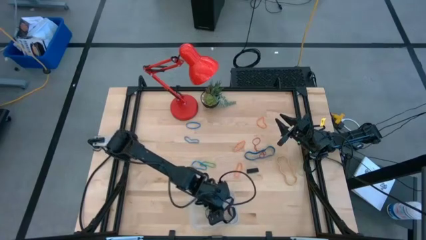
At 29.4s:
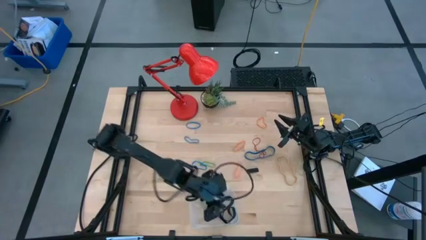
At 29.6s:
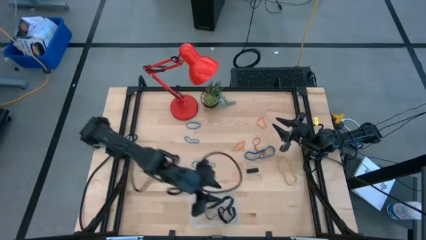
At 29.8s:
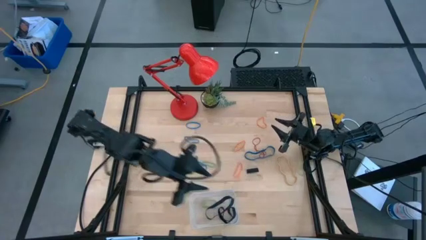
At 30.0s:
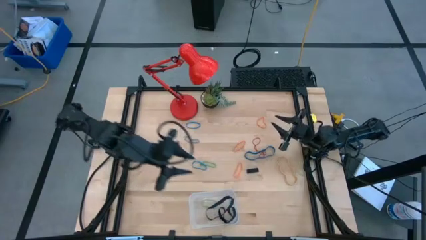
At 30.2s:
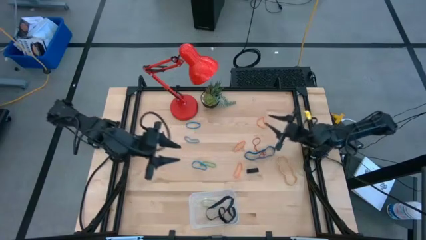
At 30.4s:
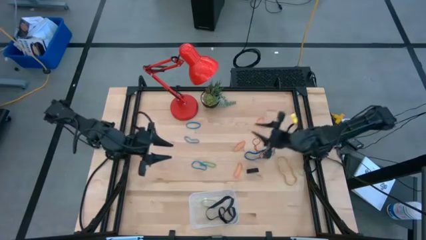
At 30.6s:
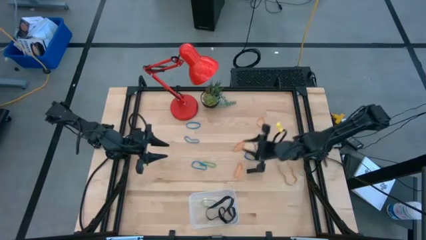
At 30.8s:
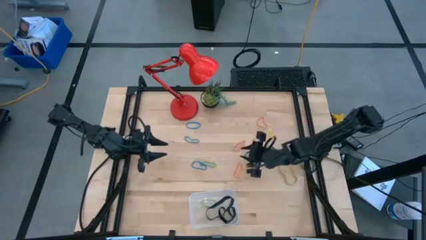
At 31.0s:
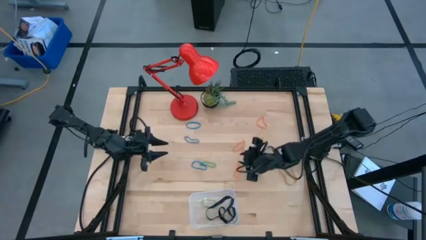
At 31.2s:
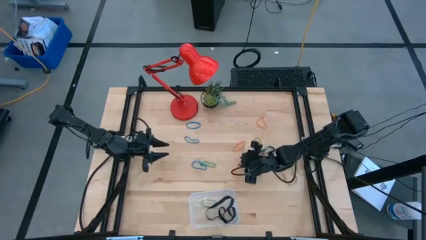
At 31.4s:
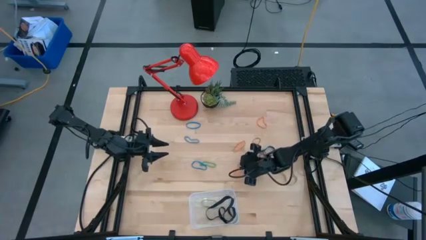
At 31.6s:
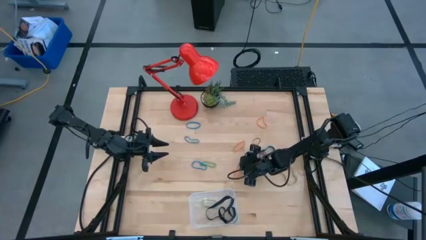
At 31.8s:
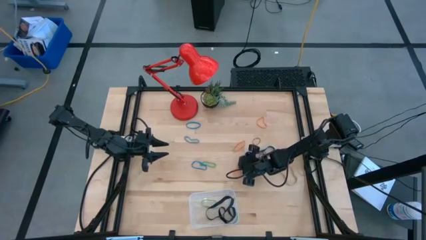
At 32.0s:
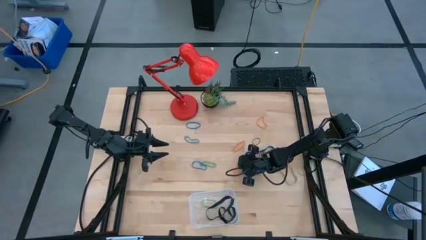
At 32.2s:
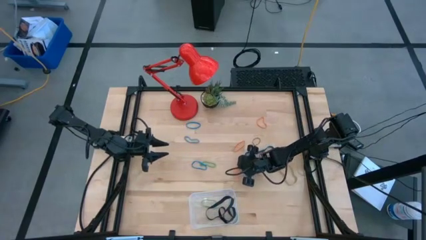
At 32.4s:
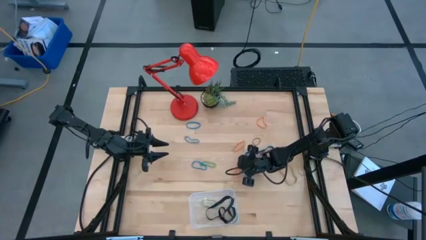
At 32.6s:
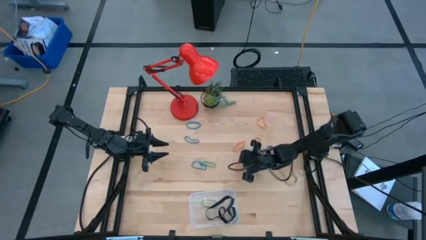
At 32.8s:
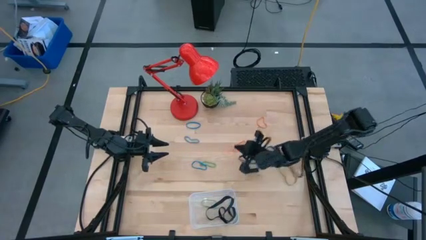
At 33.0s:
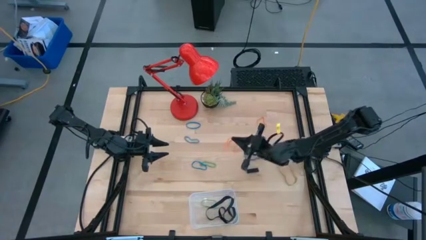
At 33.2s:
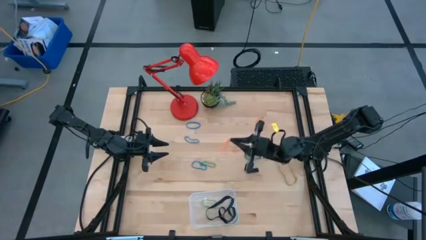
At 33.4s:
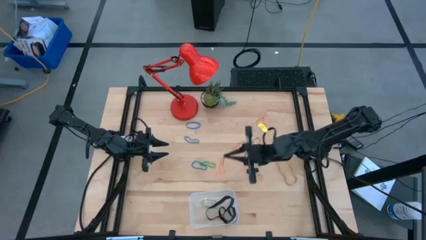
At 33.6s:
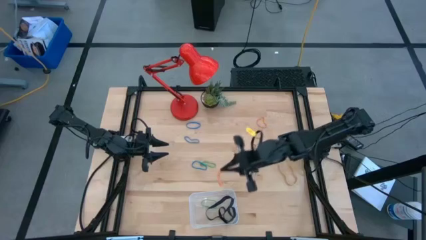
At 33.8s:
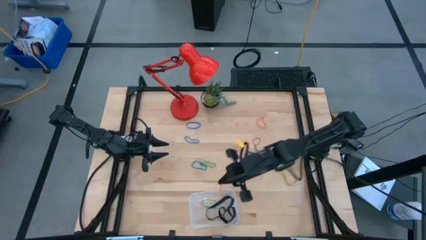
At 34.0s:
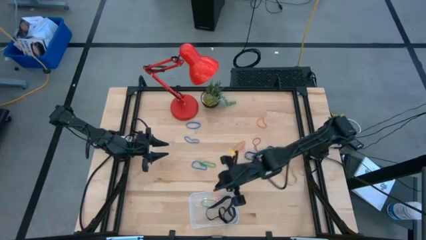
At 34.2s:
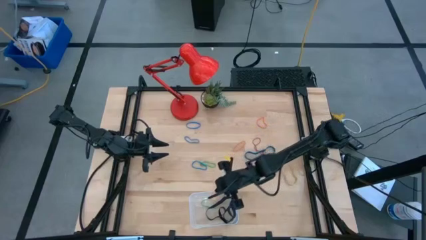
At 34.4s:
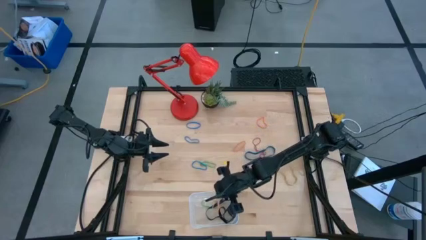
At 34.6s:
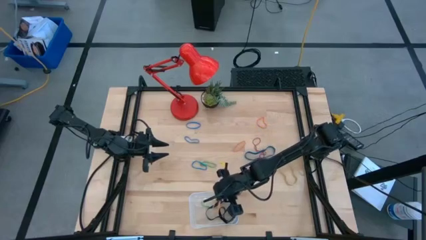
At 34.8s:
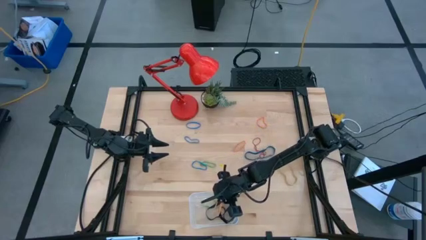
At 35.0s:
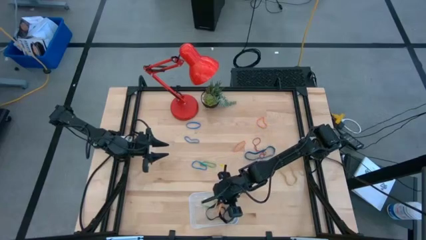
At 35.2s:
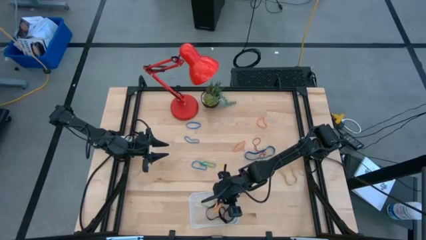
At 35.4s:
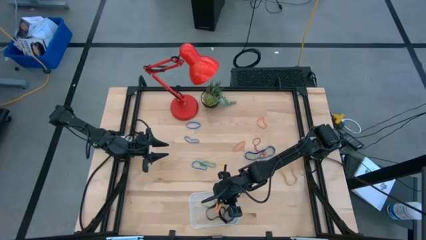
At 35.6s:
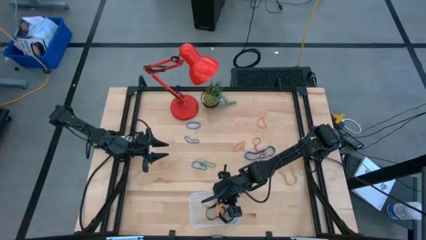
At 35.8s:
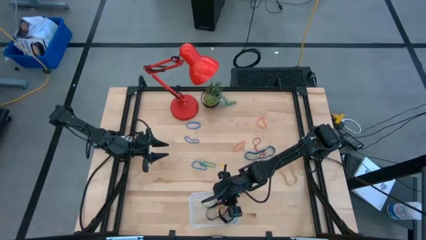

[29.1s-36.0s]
Task: Pick and place rubber bands into bin
Put the orange rubber band into the transparent bin

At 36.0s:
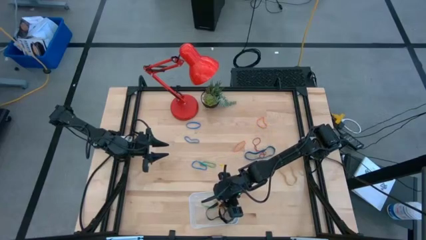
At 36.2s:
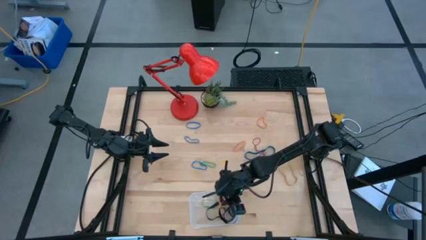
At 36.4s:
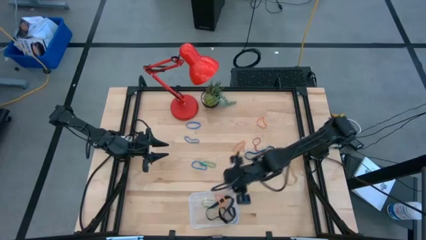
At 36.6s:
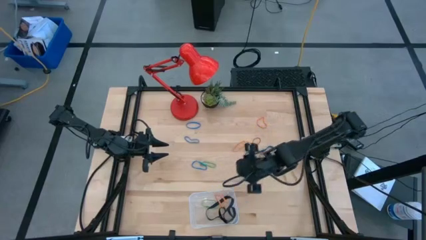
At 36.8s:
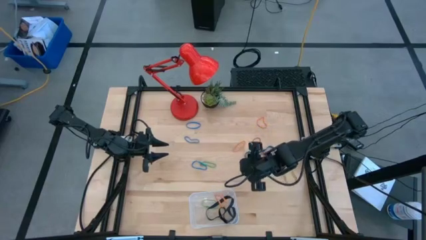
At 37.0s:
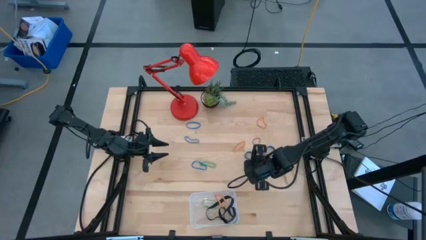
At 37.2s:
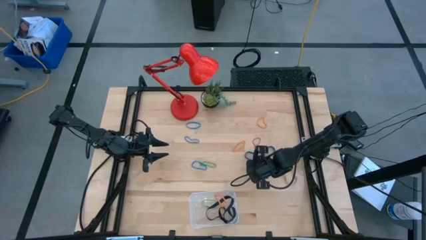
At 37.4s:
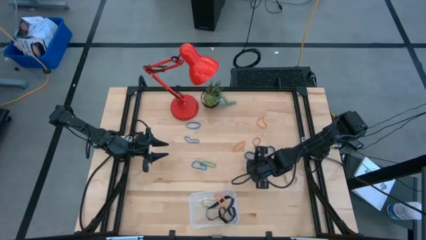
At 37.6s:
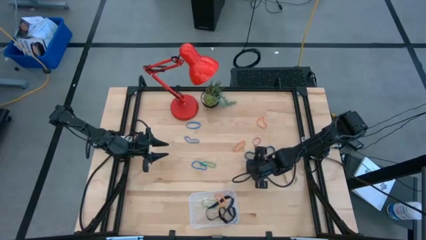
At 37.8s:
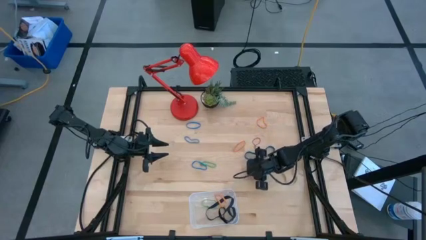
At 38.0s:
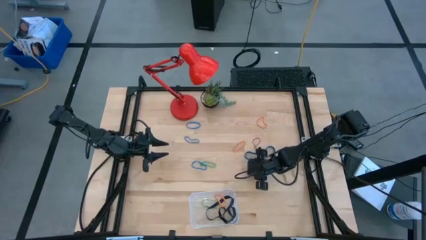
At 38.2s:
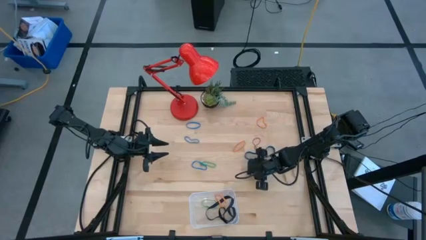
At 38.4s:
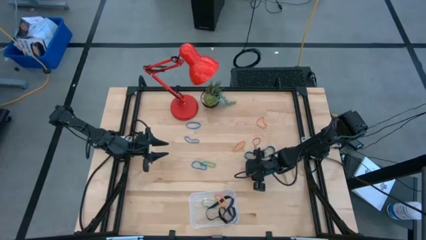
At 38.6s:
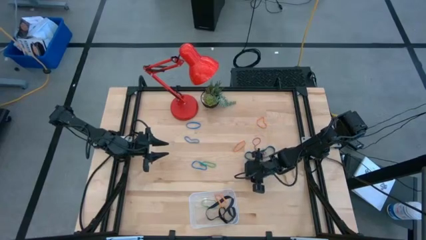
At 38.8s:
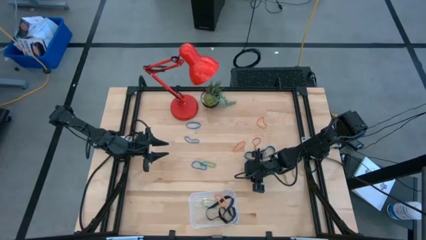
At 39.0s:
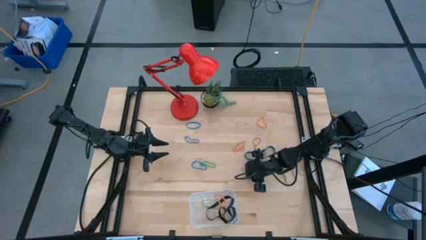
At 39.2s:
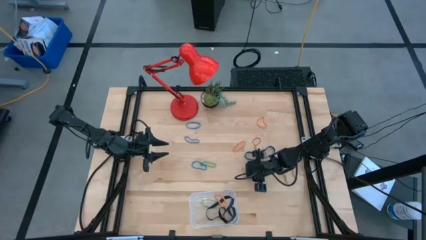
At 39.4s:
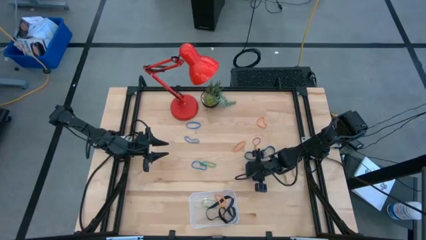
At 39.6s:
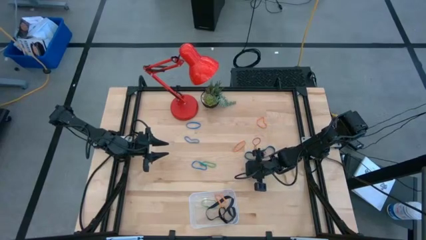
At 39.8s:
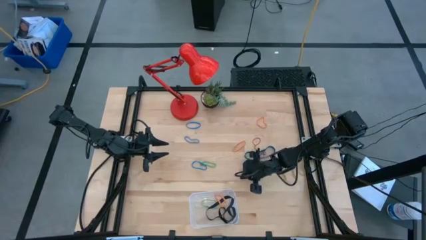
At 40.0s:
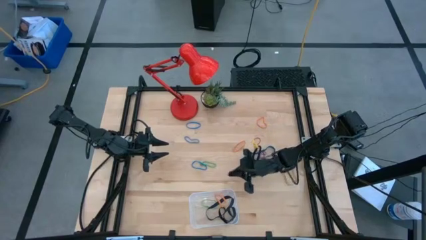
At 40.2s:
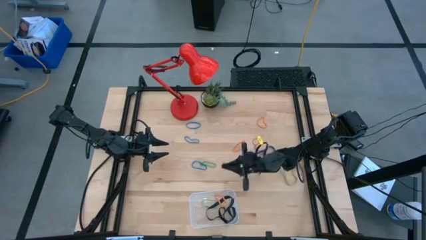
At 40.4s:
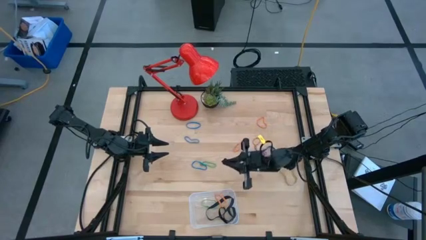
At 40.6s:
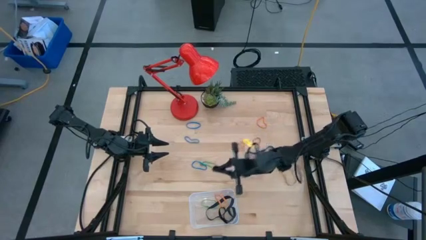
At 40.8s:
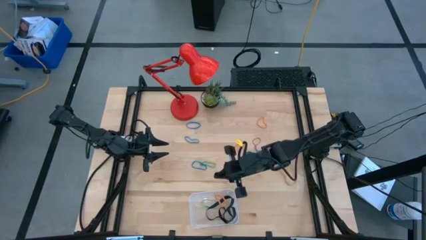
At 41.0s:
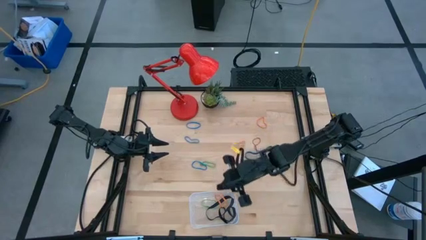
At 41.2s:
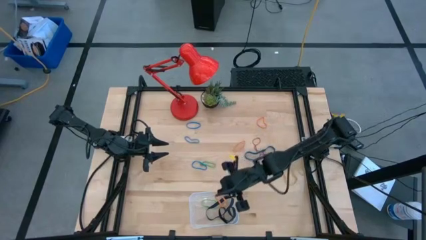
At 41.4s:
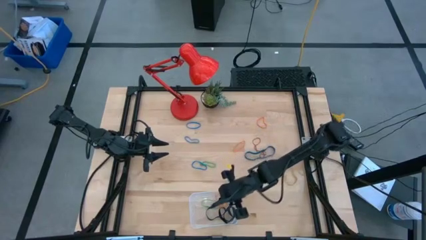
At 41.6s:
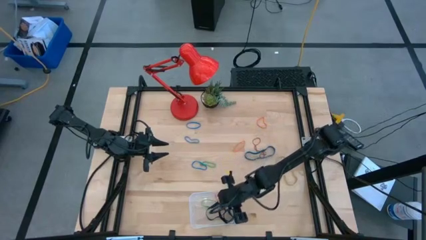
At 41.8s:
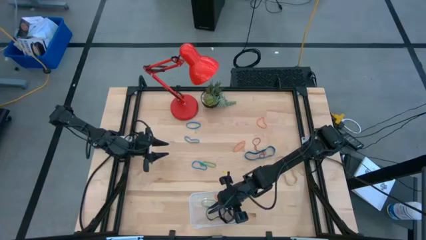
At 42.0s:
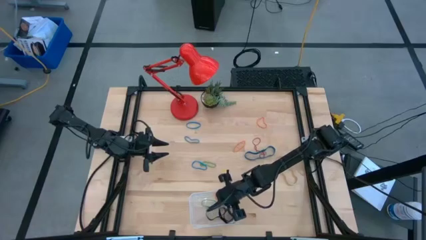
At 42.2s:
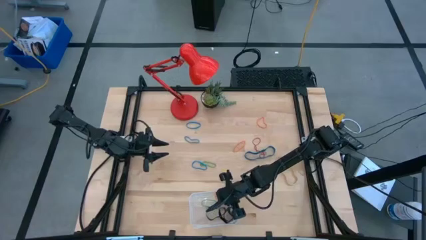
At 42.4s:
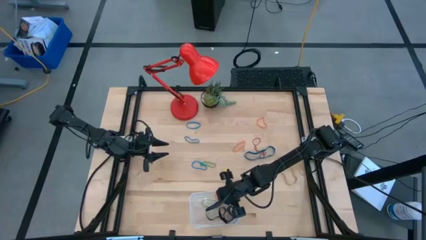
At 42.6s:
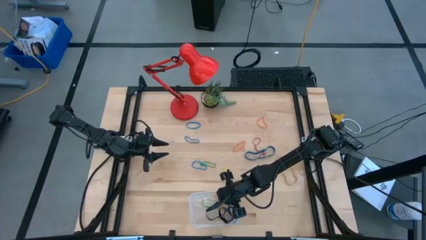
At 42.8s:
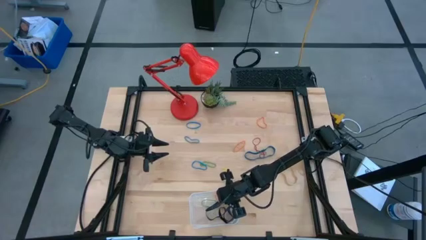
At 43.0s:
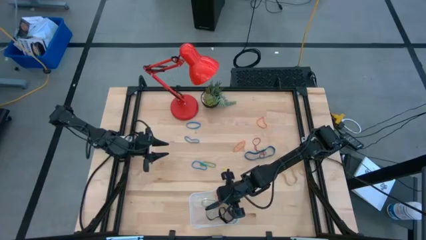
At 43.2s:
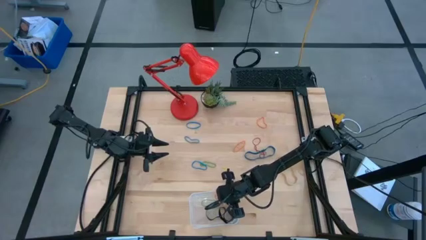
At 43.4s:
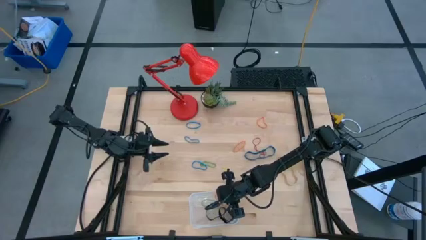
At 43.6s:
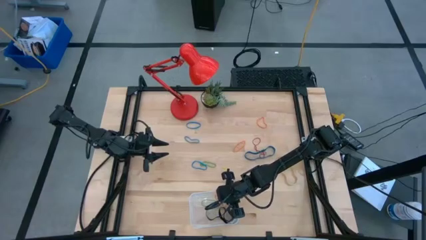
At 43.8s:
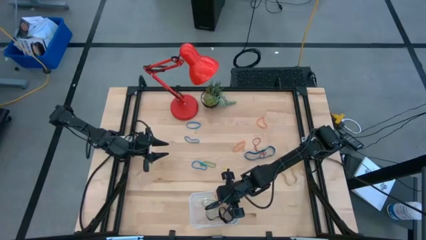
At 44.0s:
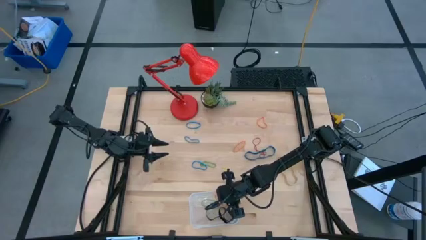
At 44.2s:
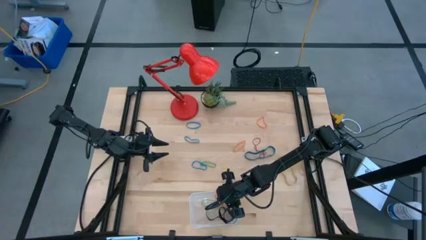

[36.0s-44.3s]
Put the black rubber band into the bin

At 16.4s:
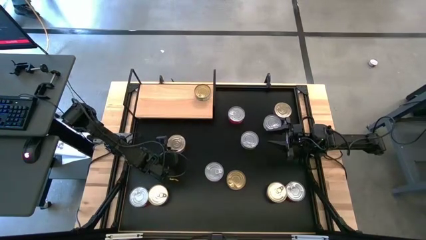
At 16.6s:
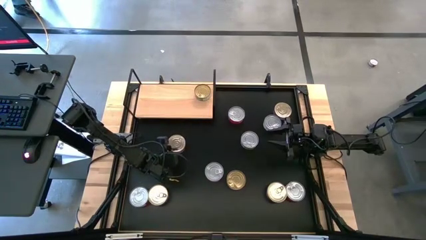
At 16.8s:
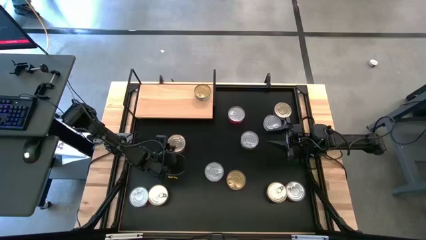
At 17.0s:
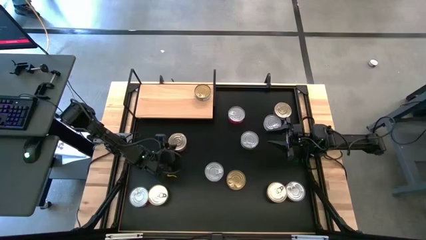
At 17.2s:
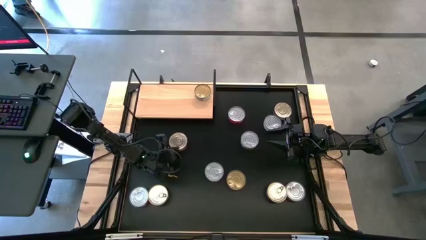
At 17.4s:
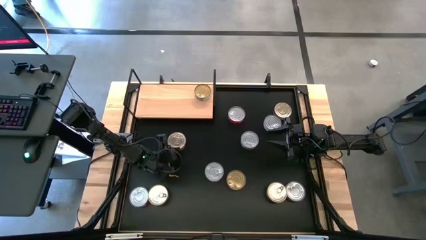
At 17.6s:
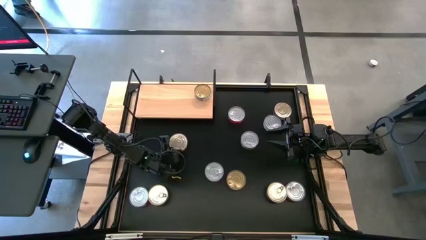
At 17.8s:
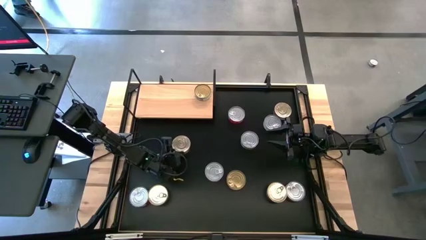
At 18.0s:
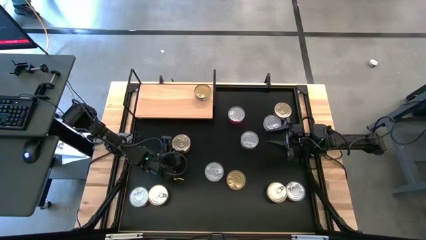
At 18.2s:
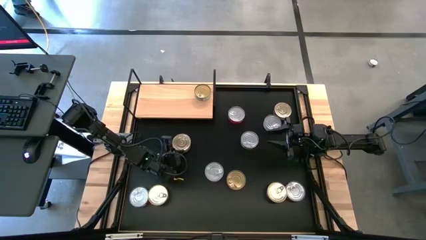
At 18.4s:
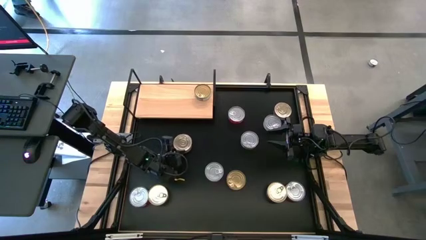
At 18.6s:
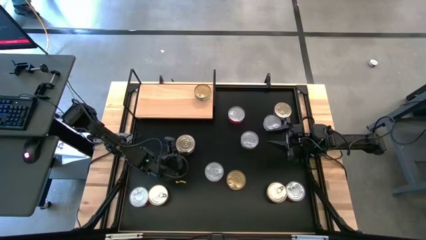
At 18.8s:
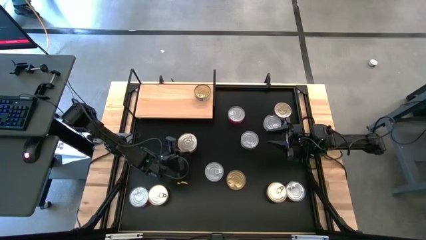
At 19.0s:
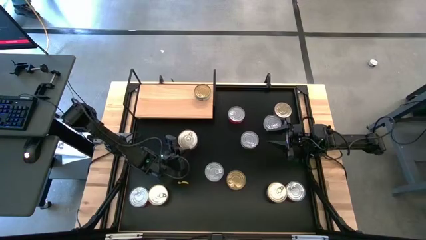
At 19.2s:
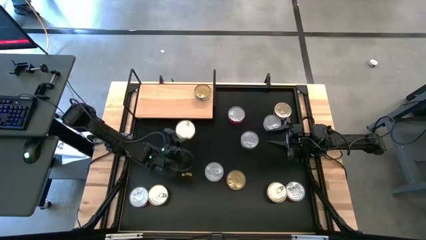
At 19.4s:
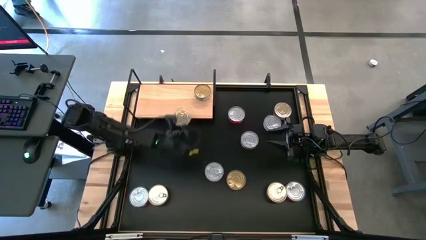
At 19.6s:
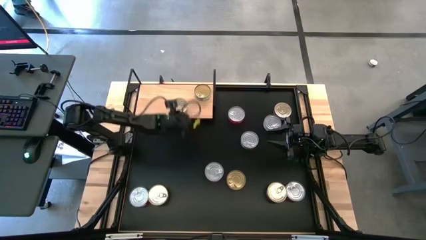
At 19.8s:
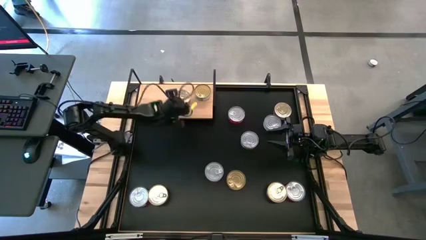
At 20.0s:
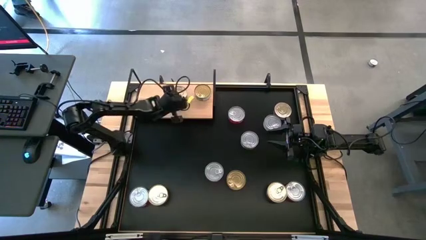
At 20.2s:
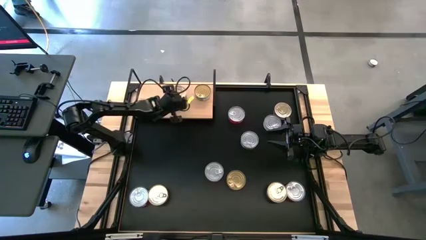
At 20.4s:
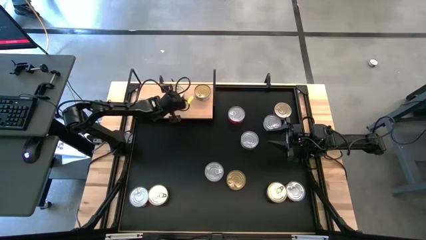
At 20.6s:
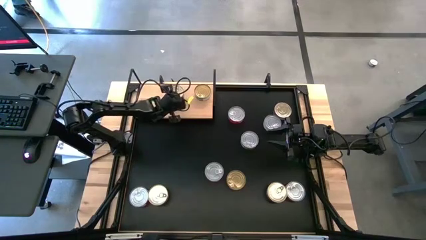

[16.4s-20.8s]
Task: Stack canned seafood by type on shelf
Put the pink blue tuna can on the shelf
